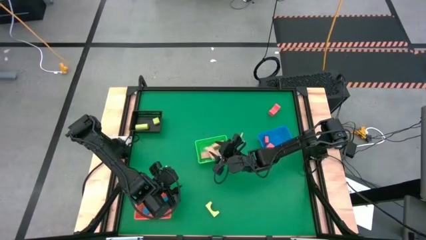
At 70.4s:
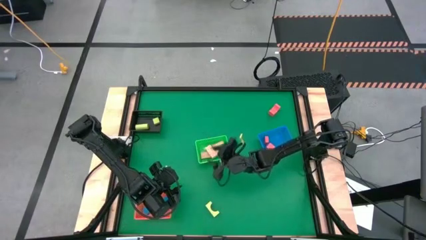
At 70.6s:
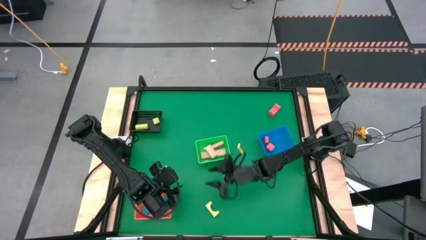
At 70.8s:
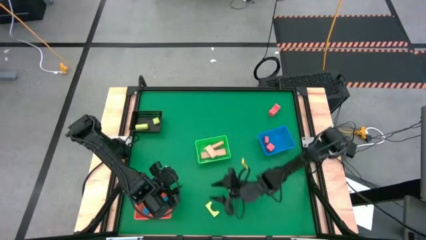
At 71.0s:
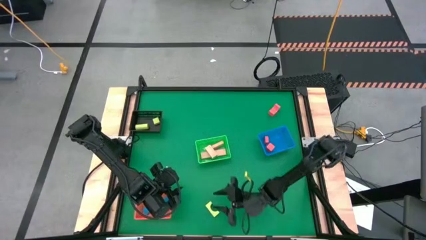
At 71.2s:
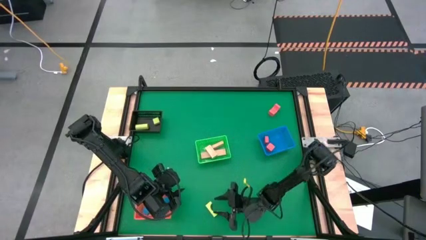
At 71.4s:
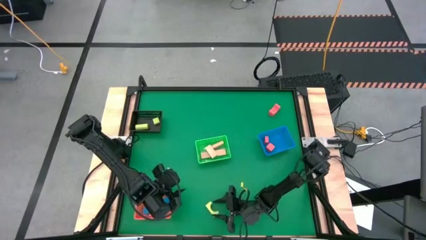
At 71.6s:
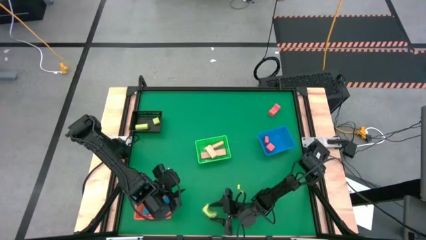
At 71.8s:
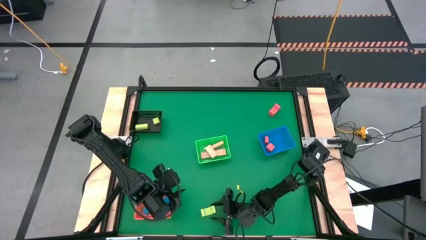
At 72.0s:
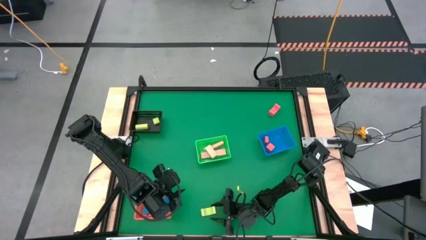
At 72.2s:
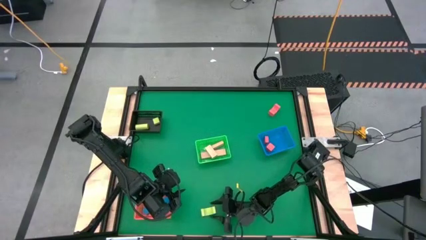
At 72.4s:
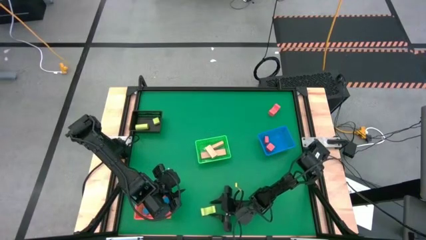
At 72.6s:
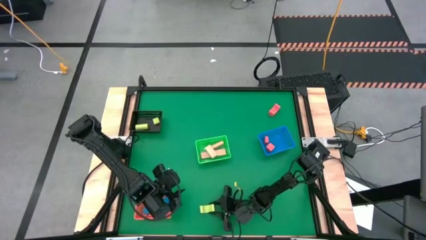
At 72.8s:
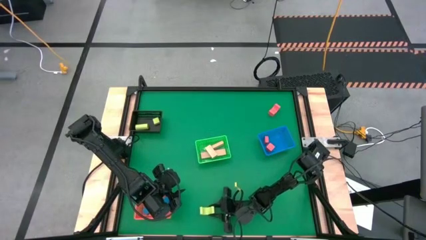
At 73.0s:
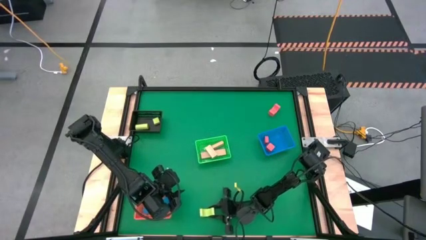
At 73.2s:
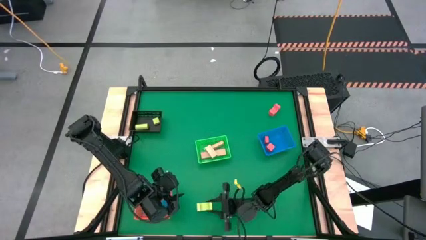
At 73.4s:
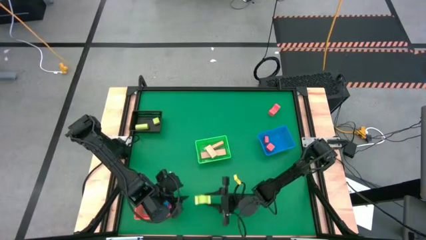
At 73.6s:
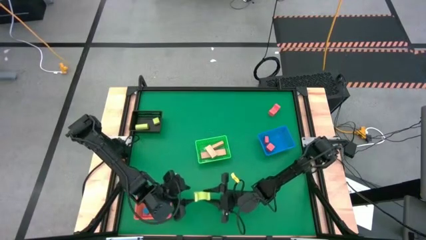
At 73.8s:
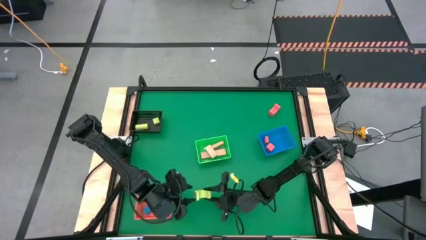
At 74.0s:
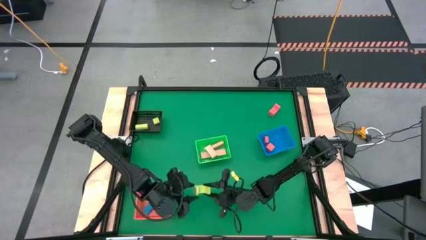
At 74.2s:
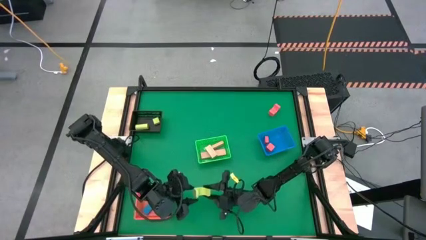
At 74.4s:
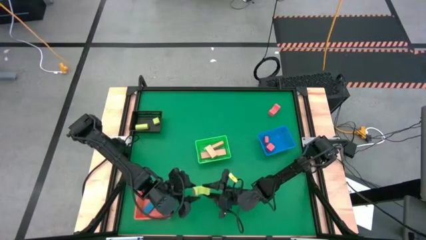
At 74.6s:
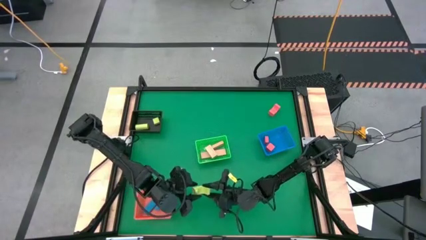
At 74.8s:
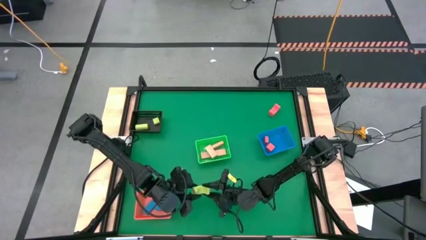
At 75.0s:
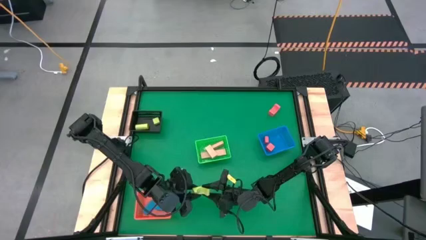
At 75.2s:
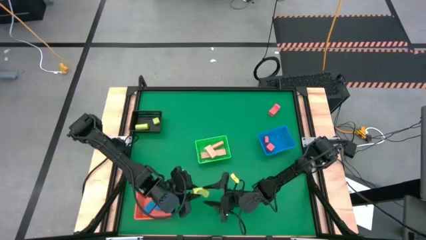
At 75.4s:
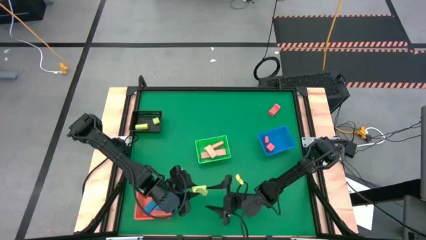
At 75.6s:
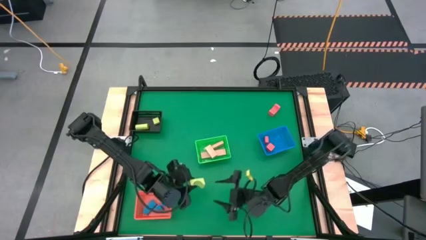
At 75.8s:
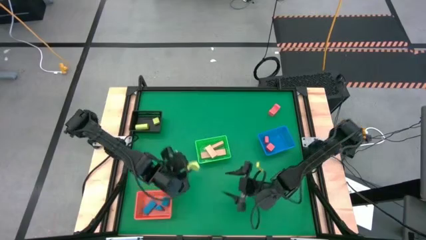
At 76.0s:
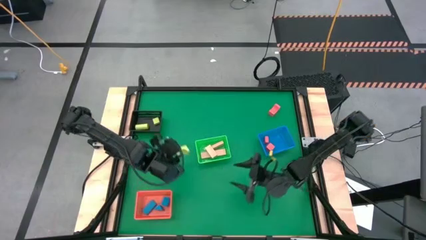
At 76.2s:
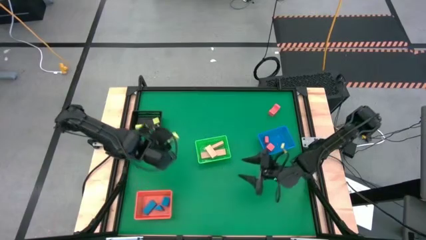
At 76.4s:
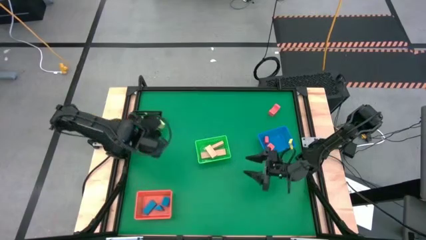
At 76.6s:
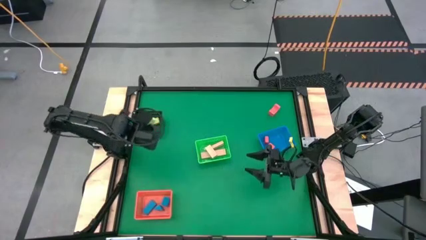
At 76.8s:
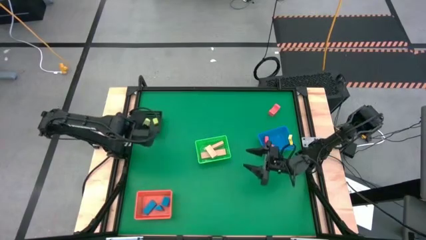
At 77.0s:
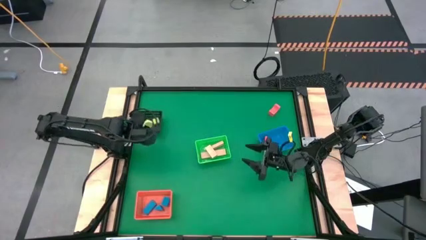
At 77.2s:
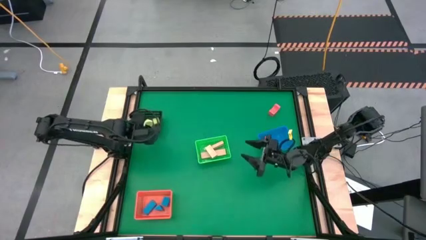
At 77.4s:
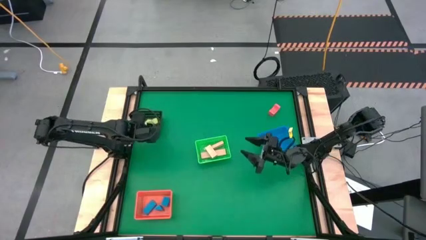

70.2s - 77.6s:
Task: Sort & place blocks by color
Put the yellow green block into the black bin

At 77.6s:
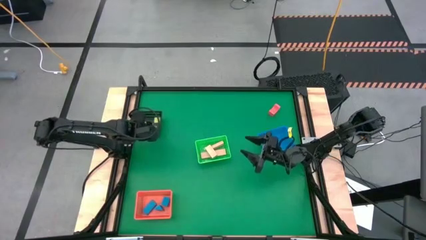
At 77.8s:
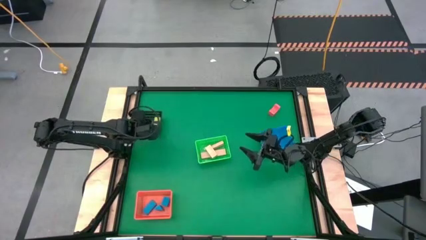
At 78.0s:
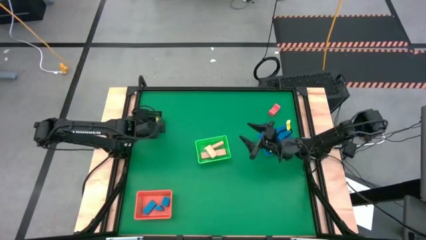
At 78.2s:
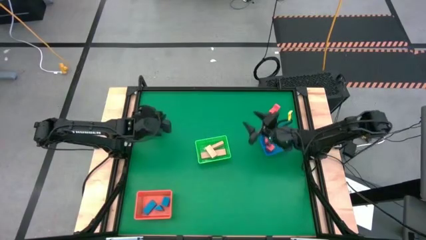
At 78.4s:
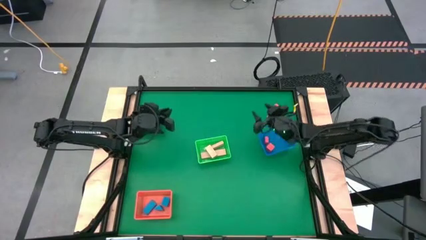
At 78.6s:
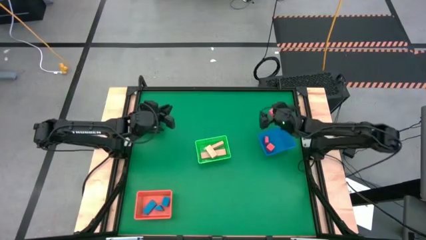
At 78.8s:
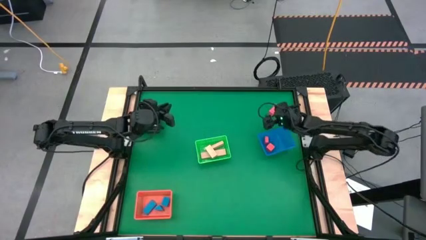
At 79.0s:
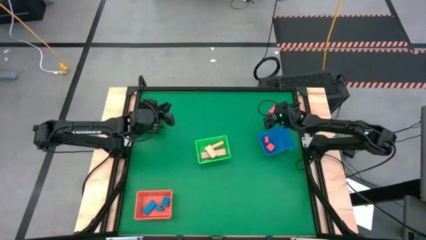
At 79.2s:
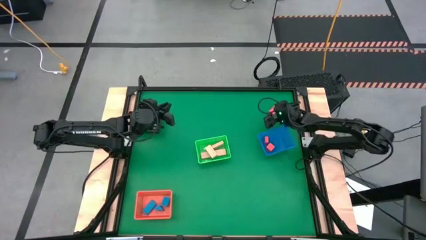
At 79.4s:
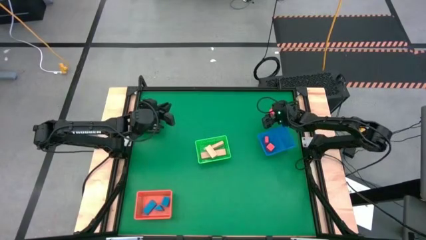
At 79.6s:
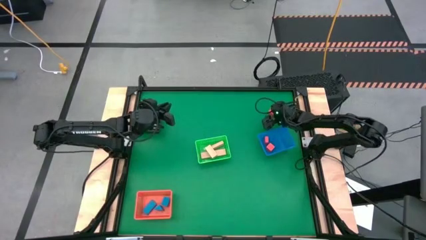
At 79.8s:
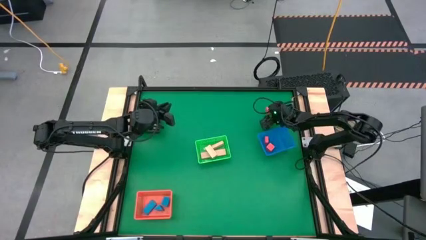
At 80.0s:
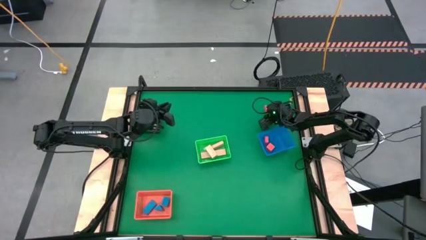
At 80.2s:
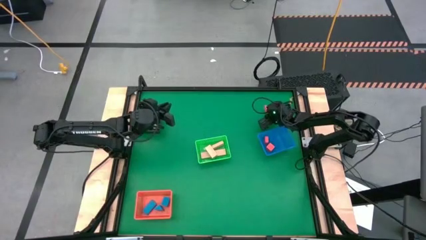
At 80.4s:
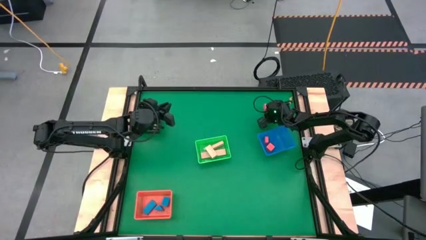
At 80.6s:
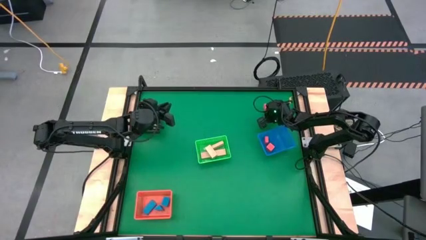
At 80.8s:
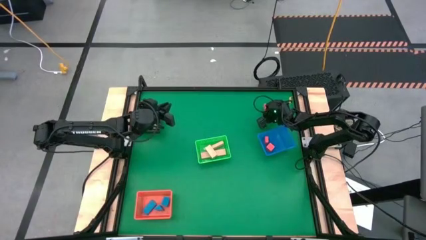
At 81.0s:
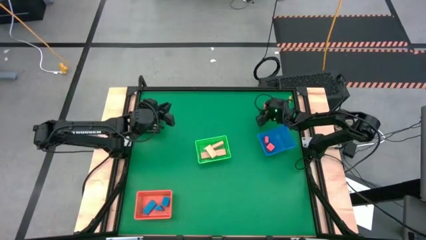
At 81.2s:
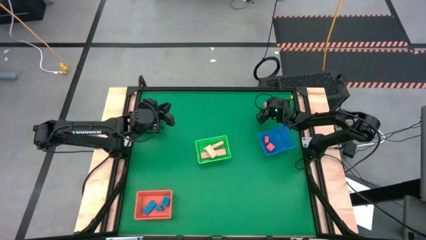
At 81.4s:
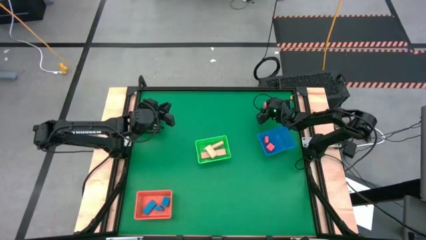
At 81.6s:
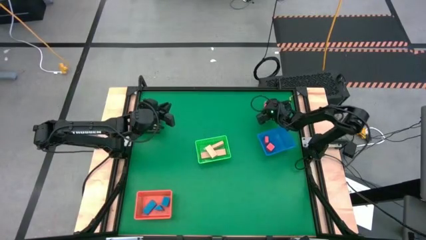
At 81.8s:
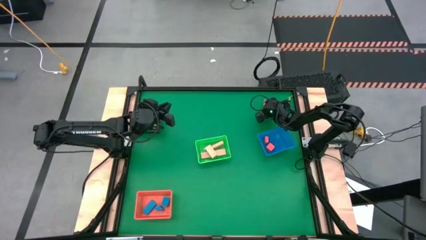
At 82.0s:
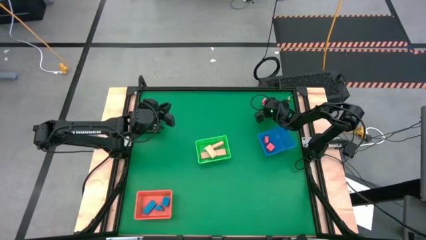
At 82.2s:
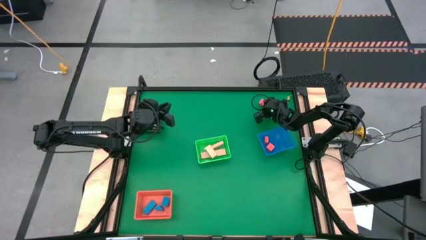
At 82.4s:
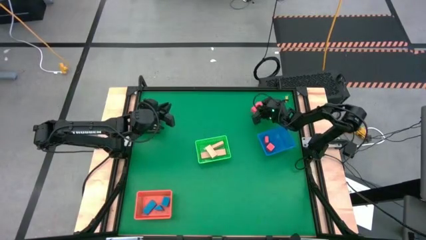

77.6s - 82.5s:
Put the red block into the blue bin

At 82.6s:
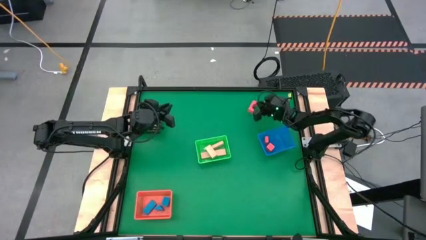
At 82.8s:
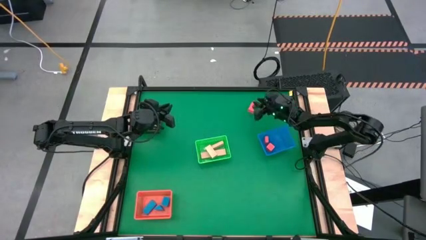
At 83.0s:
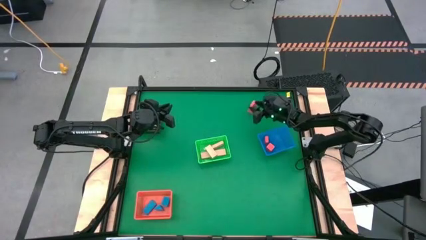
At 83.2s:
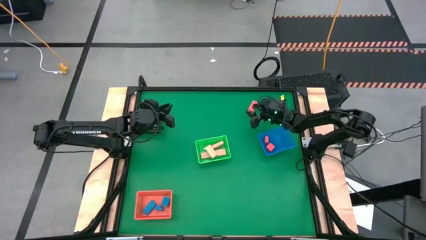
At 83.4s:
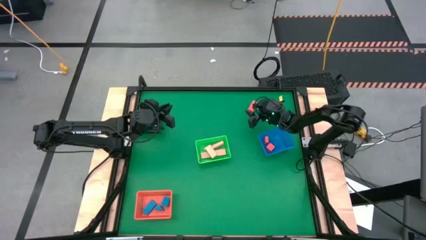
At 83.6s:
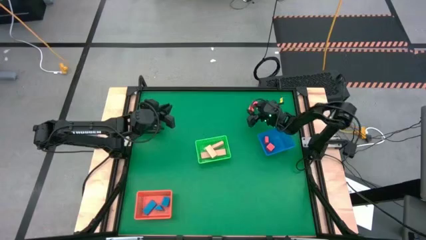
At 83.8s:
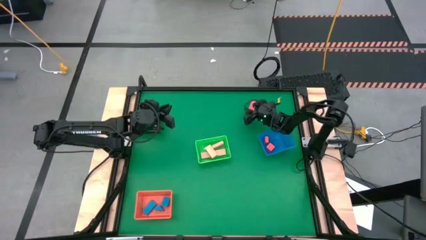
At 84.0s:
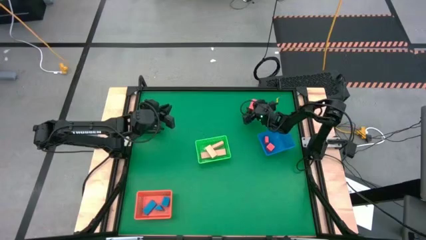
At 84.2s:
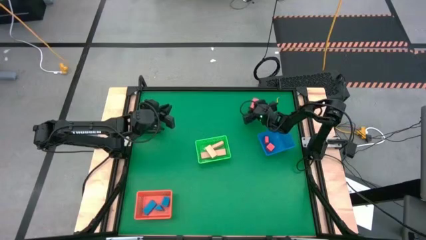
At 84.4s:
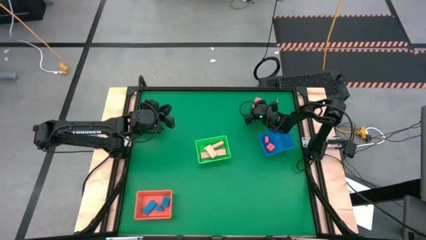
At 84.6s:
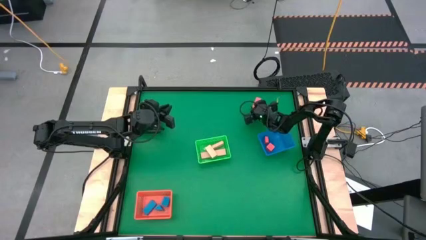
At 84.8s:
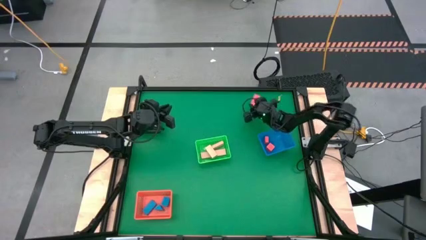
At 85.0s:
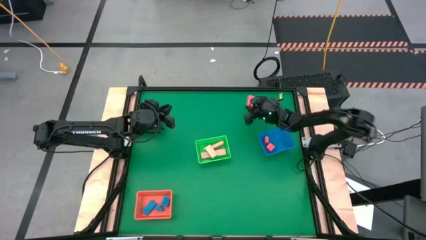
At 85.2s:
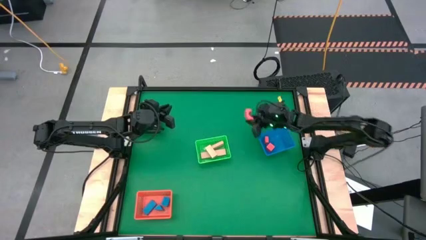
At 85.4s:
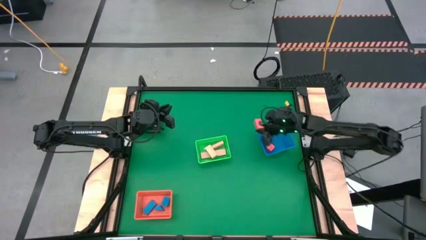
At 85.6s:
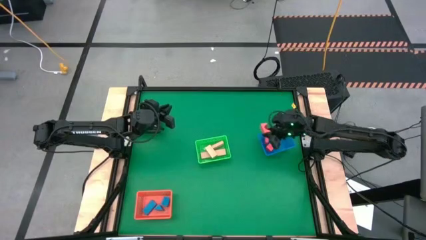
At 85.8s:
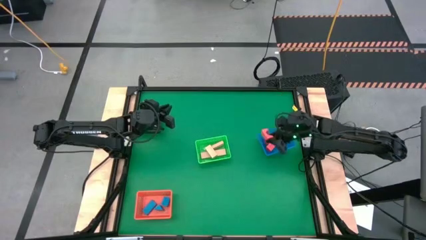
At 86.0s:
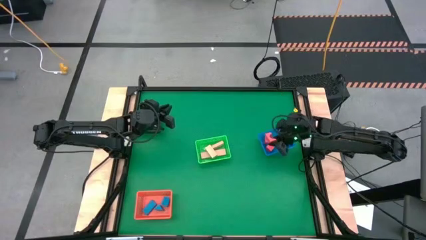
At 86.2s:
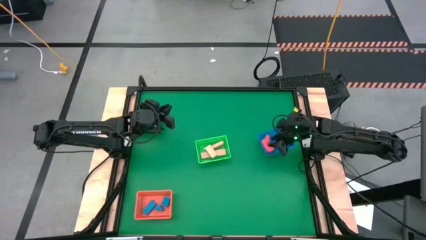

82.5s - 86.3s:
Put the red block into the blue bin
